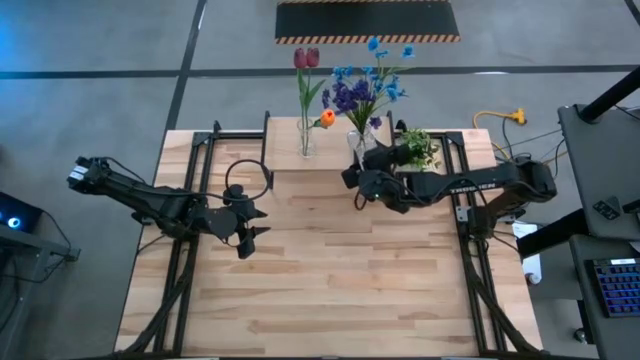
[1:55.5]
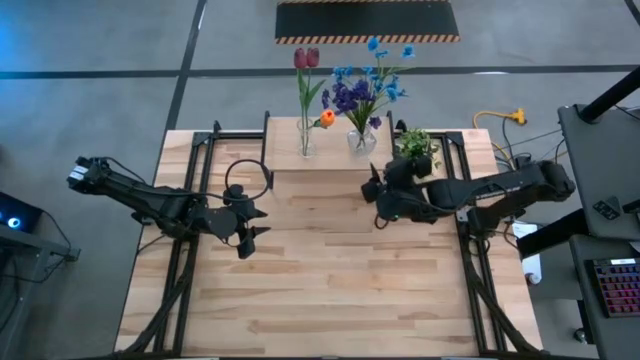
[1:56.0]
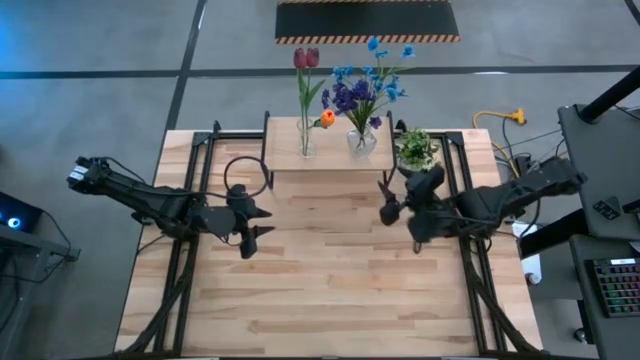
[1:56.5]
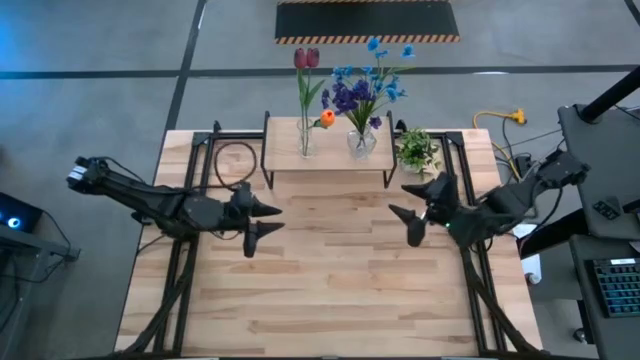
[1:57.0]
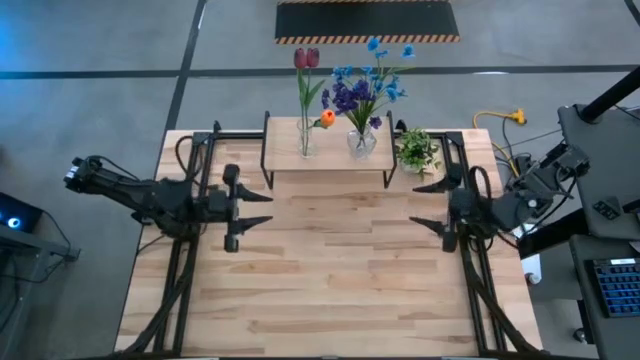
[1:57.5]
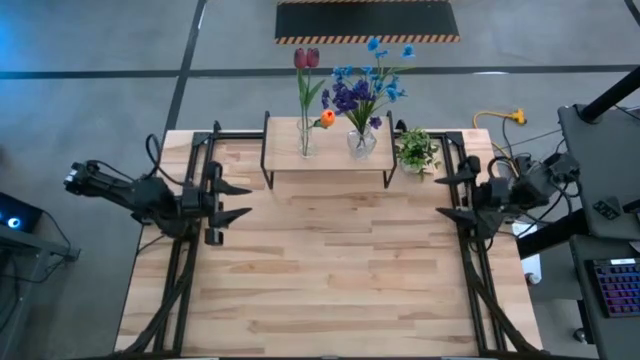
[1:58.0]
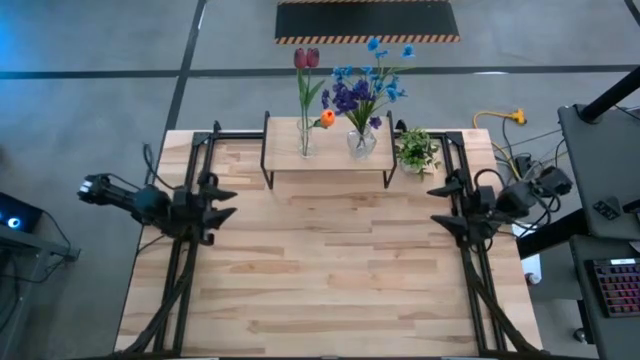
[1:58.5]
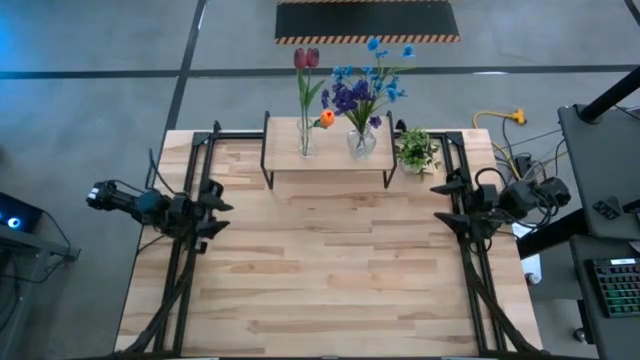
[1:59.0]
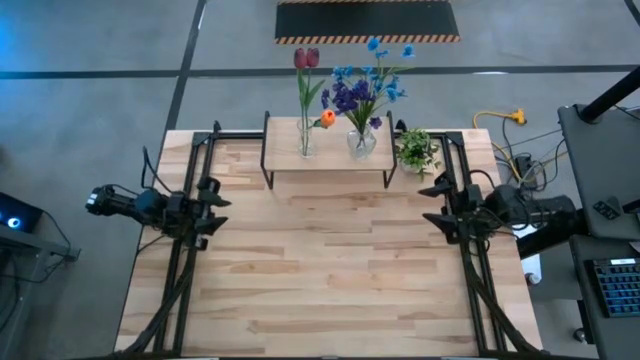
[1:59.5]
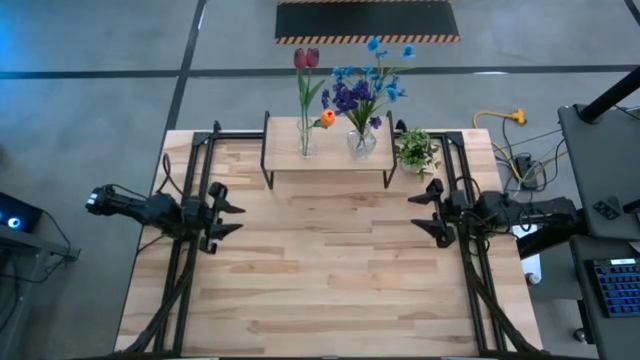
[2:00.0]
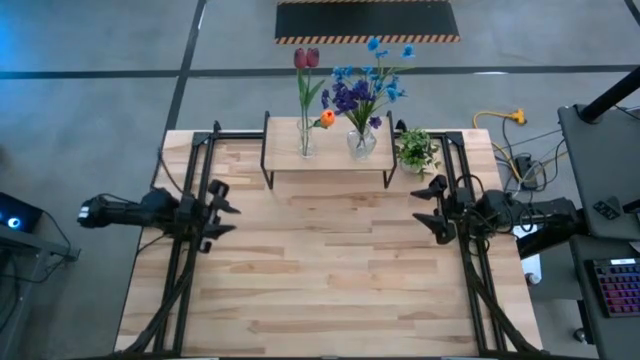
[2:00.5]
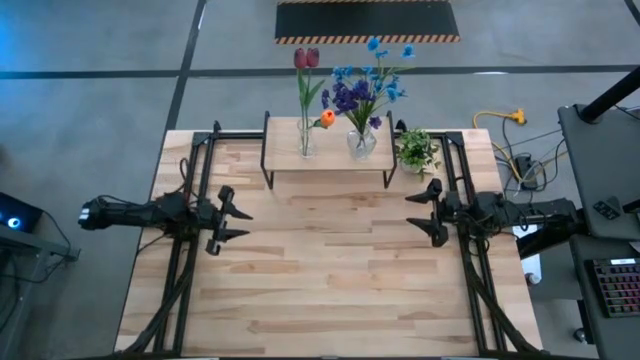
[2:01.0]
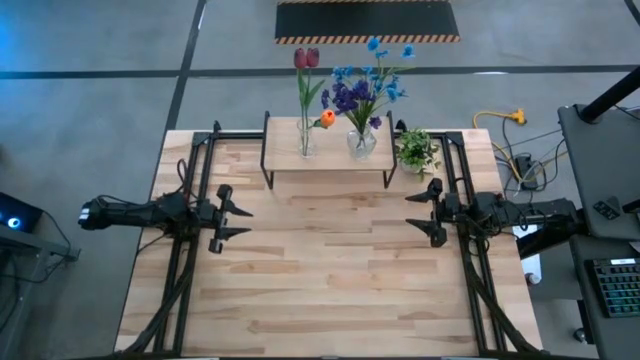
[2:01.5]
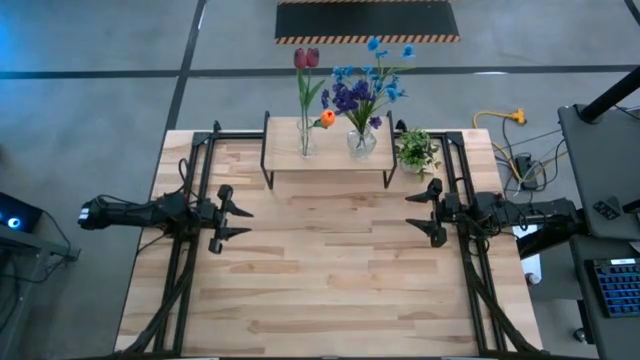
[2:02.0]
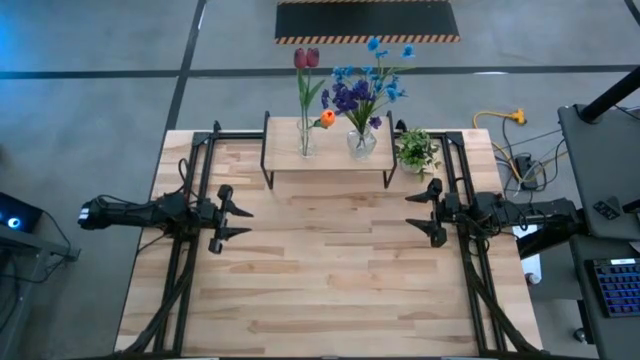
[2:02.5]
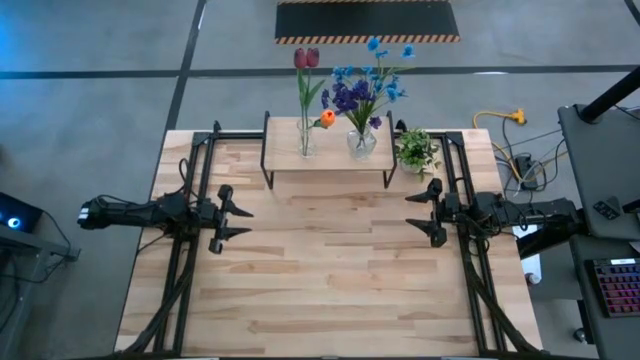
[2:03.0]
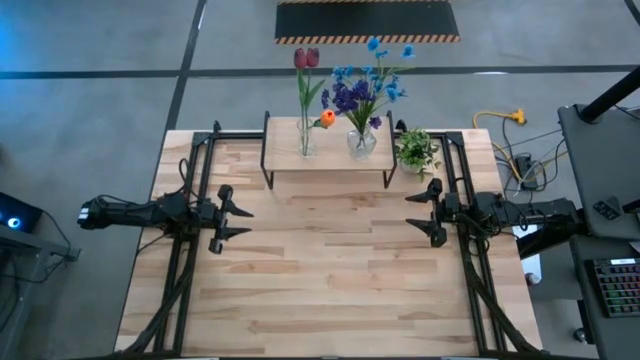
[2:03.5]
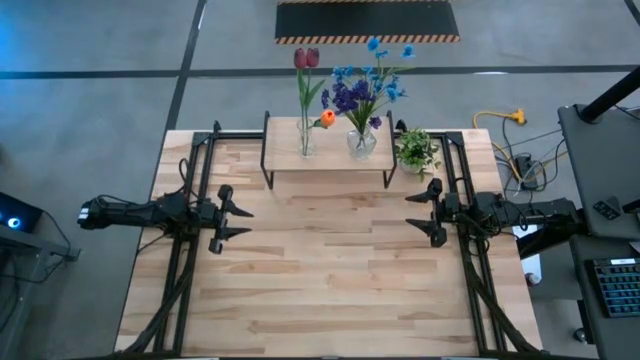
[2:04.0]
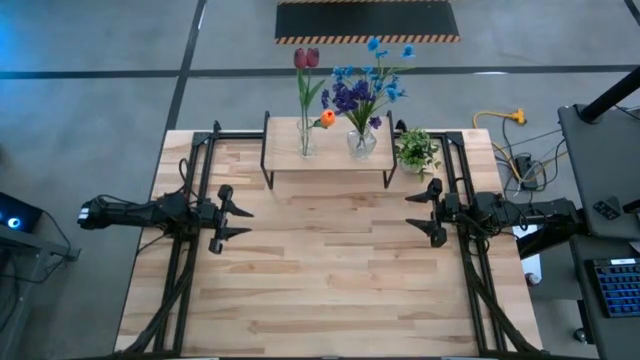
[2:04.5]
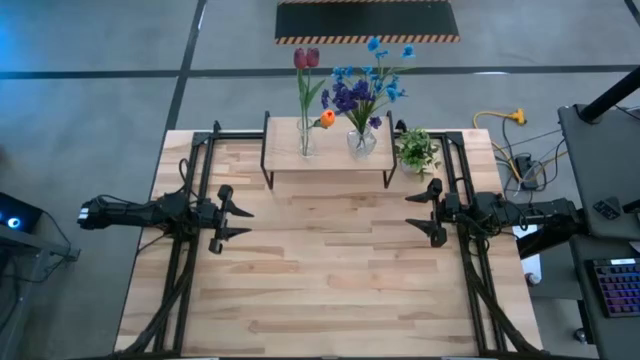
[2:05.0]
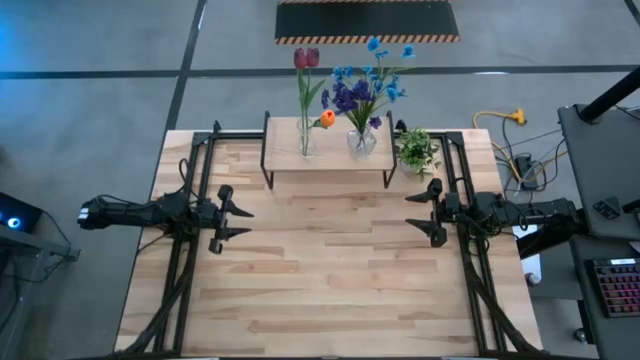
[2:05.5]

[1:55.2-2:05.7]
Task: Pick and place flowers into a vace then onto a shelf
Return to Home Position

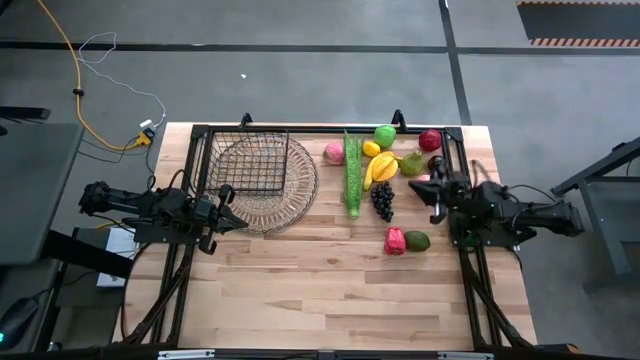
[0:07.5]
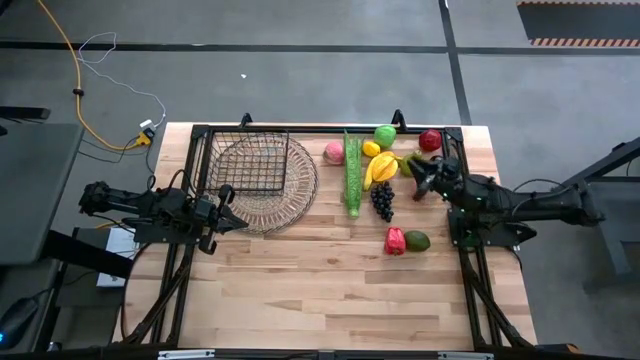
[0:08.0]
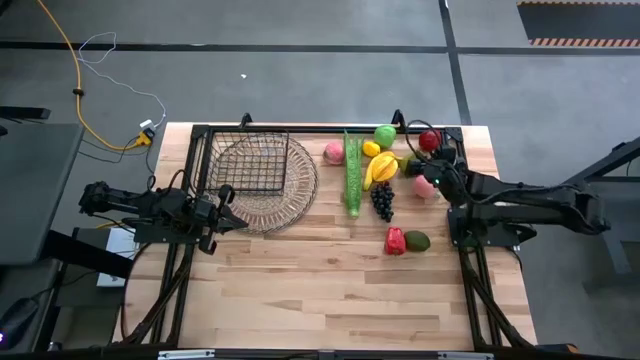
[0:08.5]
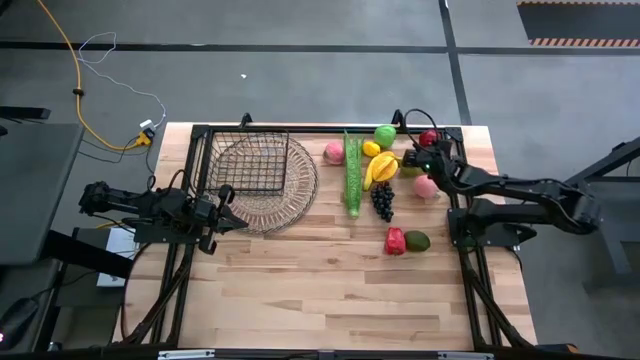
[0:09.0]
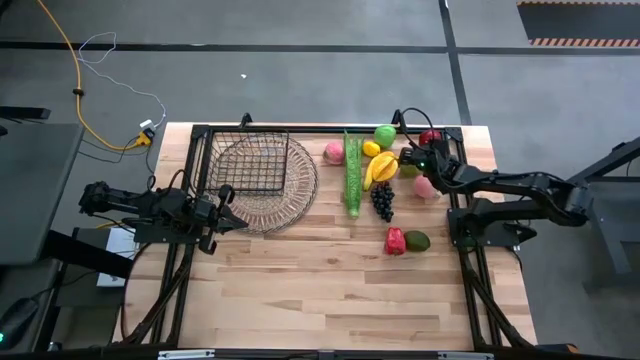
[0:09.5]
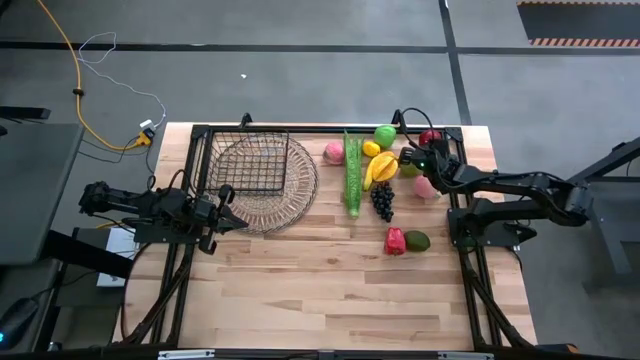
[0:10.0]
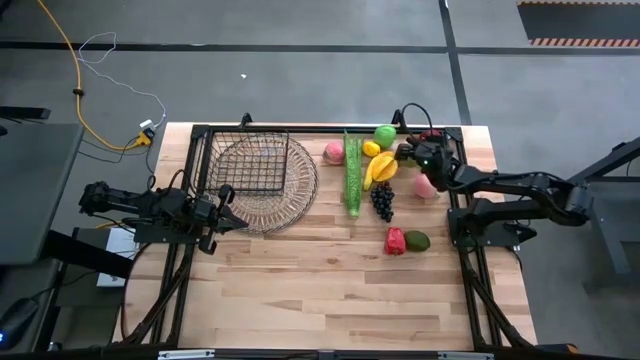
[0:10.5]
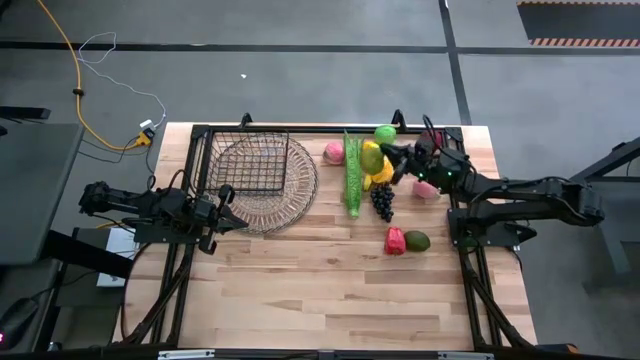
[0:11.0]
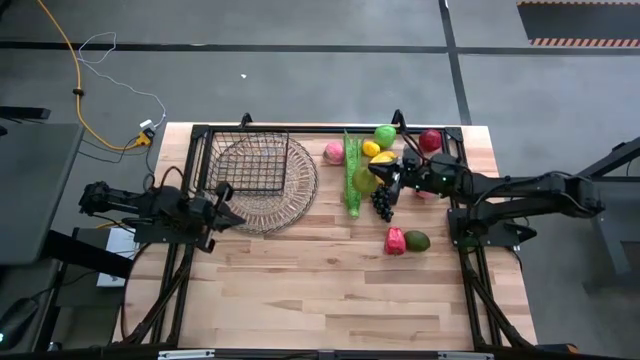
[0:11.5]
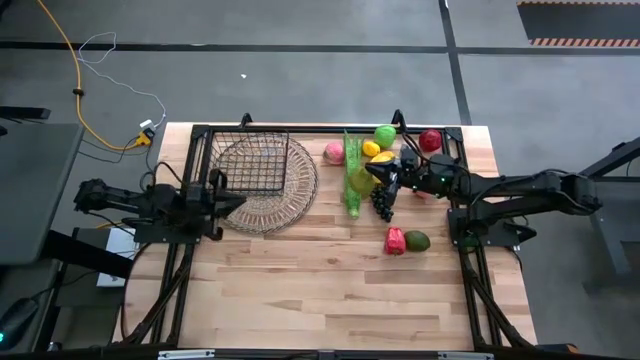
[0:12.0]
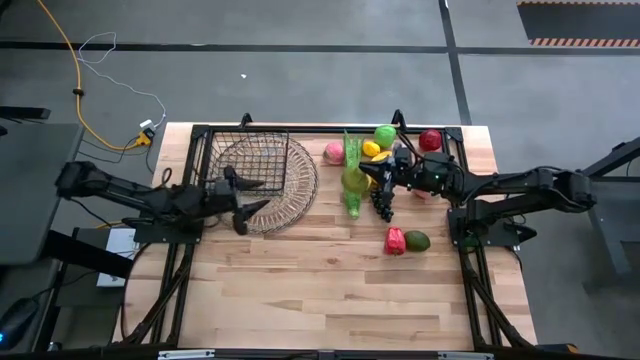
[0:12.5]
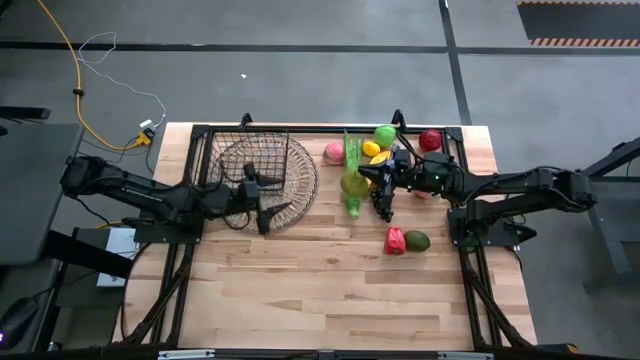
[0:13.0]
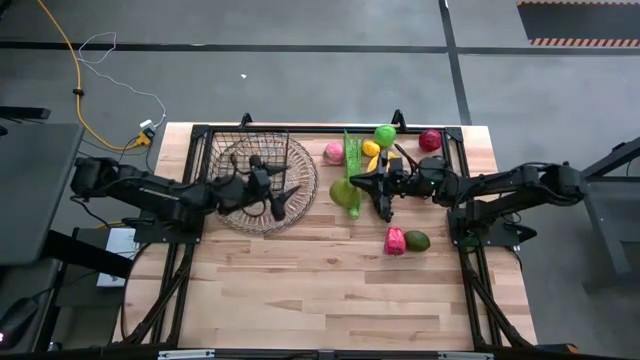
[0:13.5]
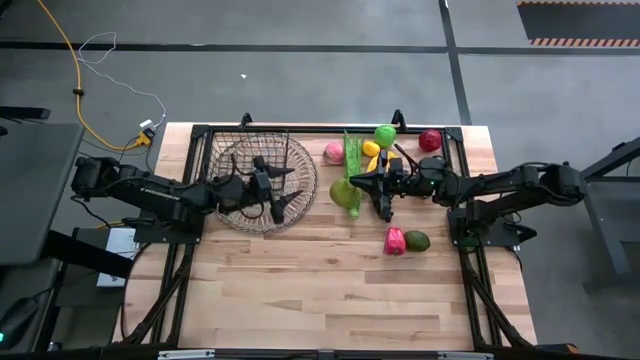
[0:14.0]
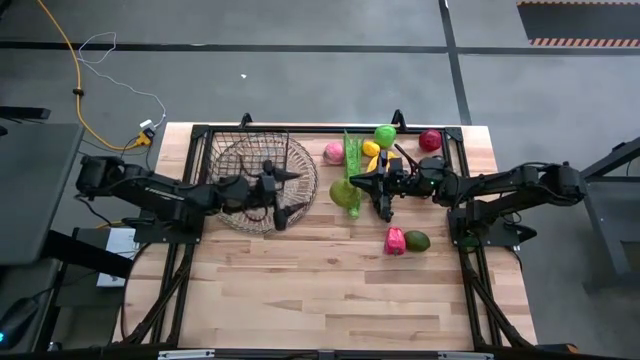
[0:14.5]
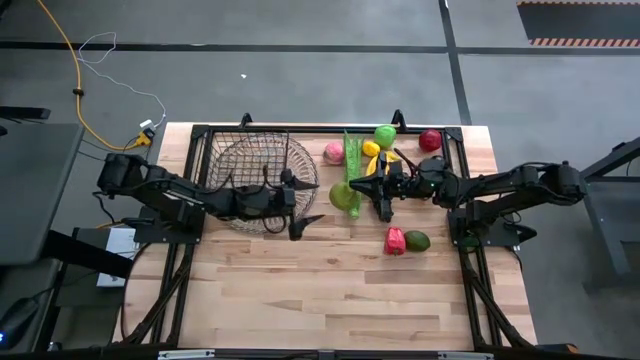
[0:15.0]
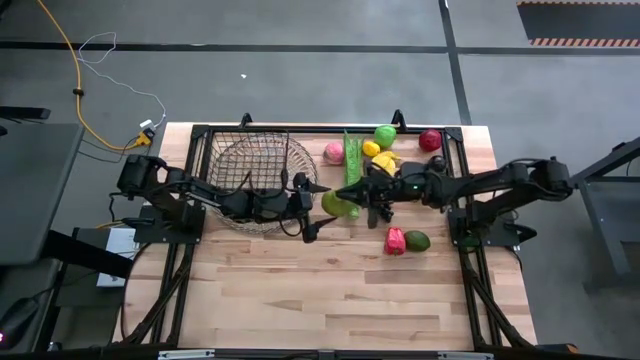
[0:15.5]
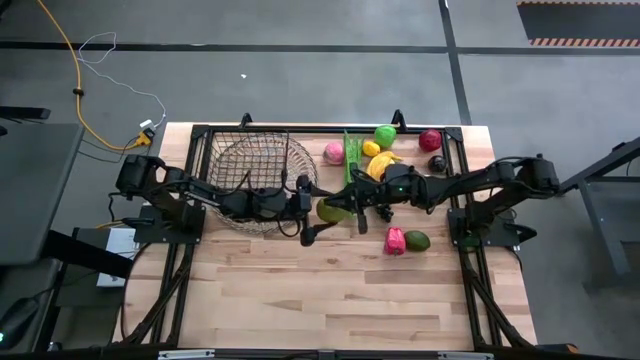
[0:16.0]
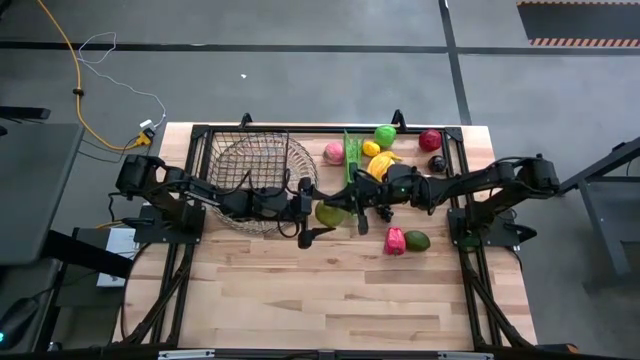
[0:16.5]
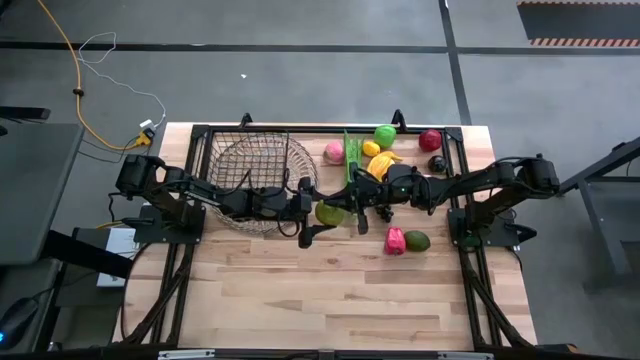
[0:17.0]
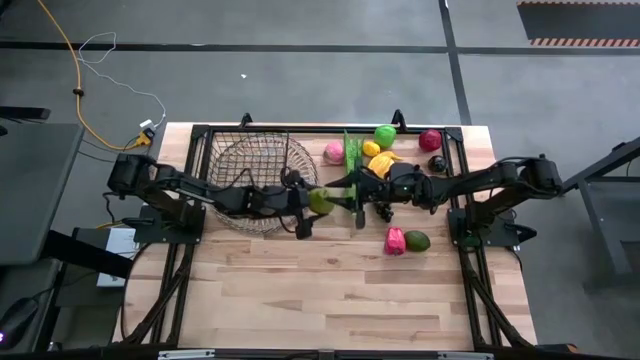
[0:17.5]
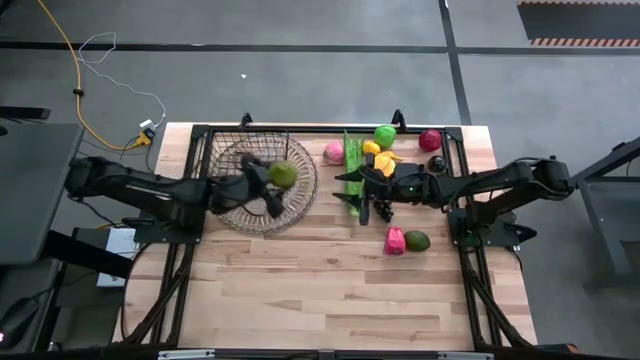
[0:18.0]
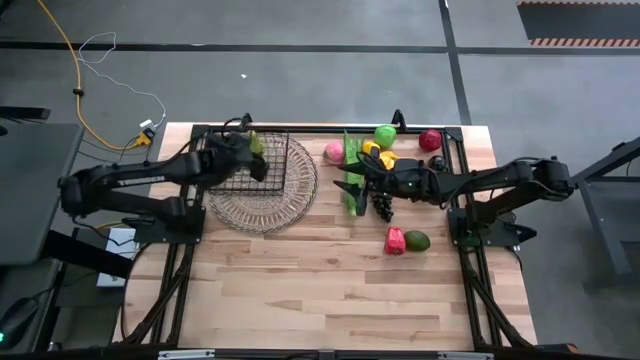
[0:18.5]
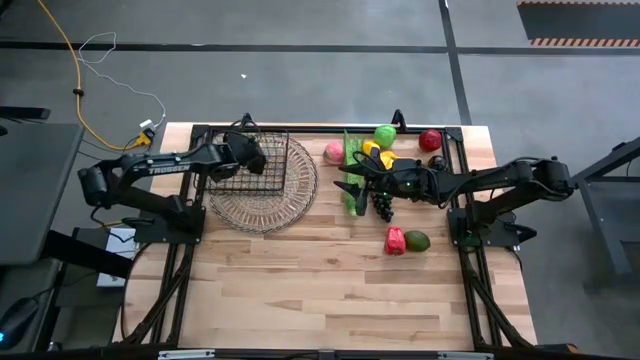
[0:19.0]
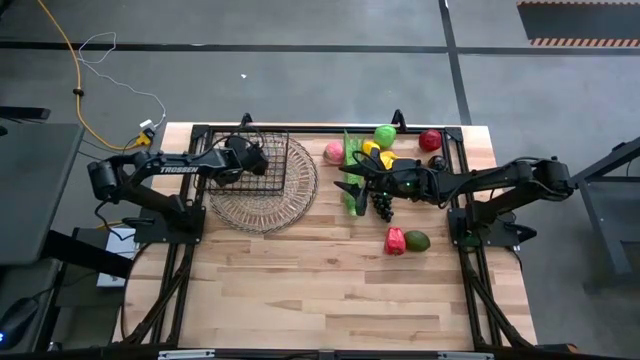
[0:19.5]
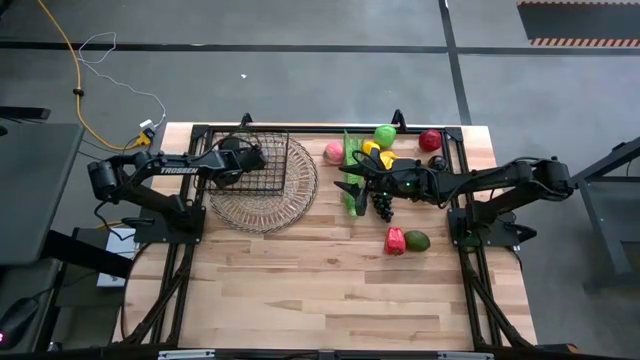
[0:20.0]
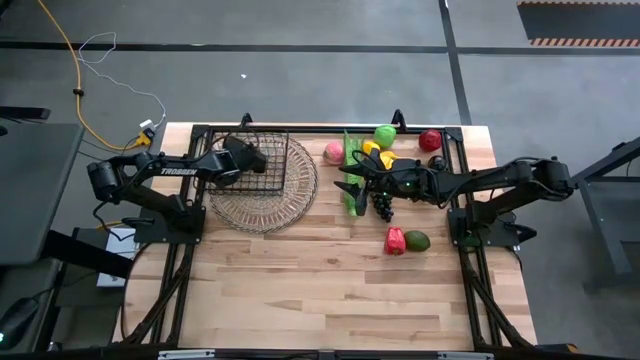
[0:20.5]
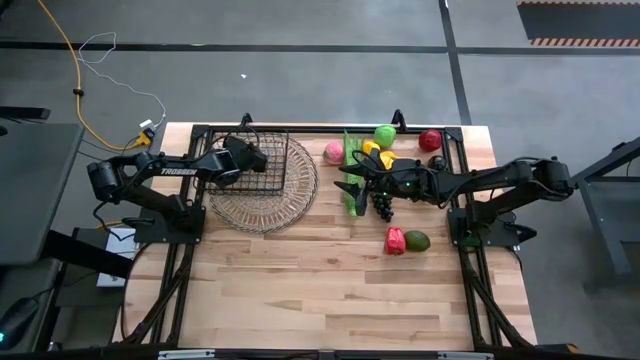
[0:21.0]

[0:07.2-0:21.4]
Task: Build produce basket
Put the green pear into the black wire basket
